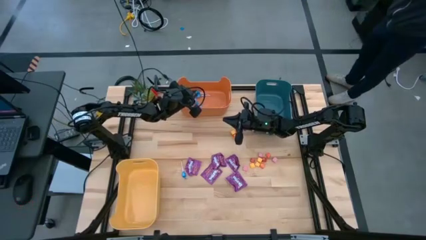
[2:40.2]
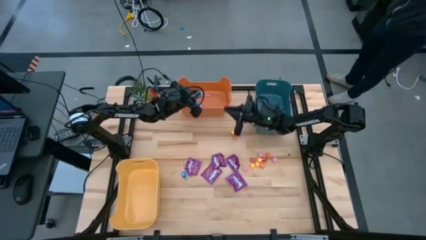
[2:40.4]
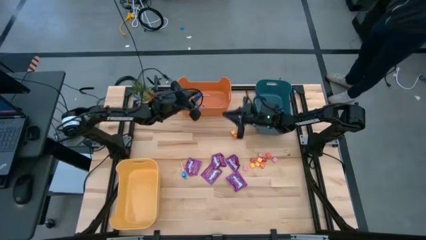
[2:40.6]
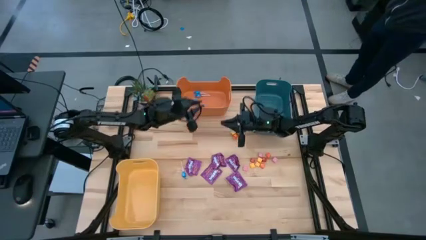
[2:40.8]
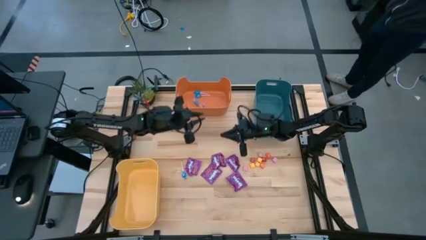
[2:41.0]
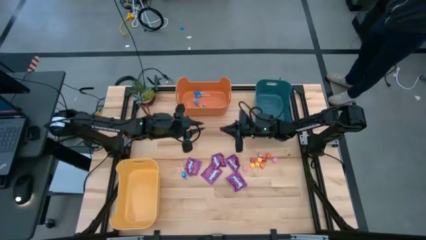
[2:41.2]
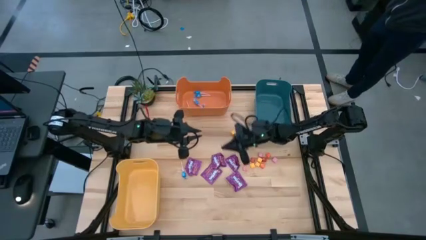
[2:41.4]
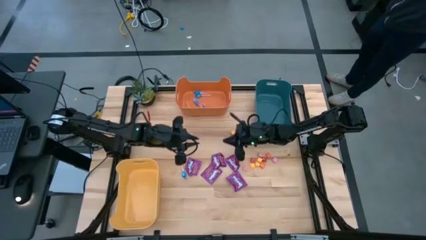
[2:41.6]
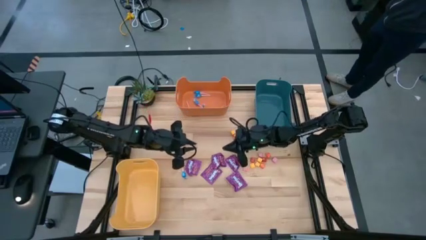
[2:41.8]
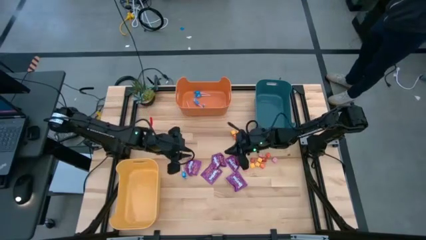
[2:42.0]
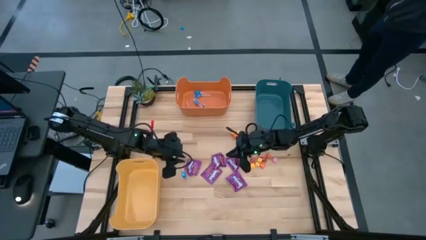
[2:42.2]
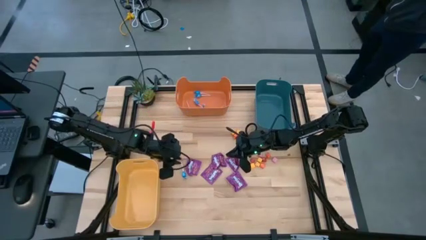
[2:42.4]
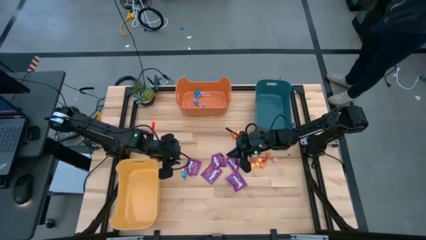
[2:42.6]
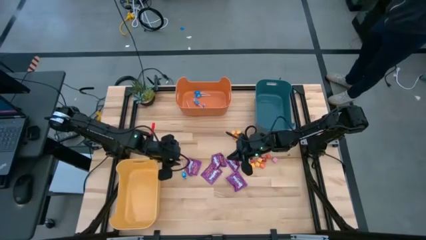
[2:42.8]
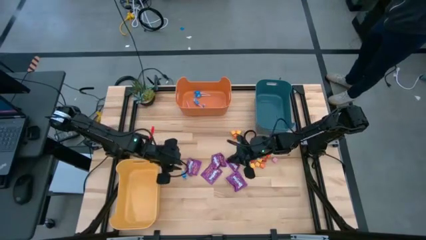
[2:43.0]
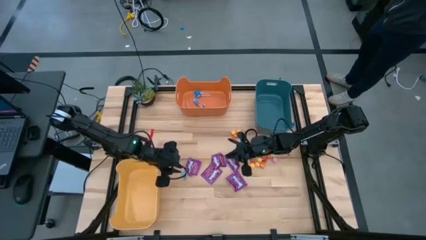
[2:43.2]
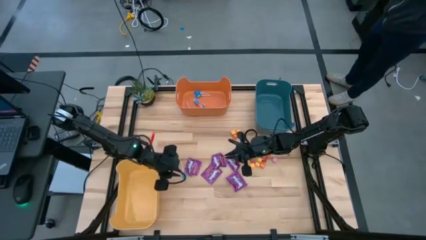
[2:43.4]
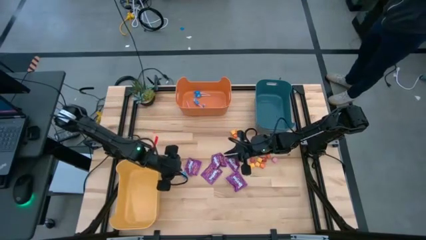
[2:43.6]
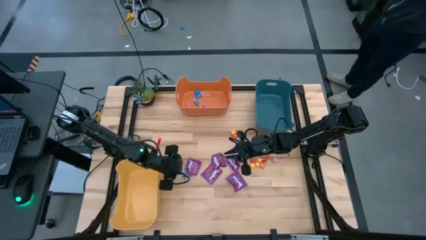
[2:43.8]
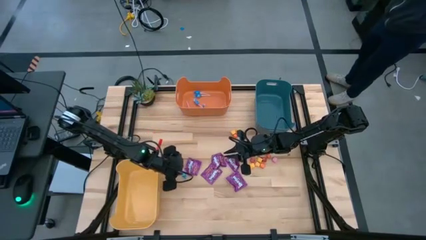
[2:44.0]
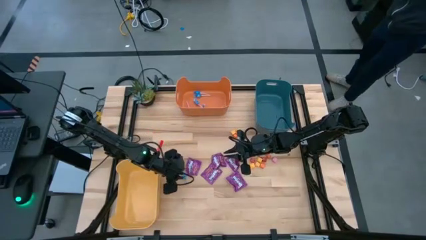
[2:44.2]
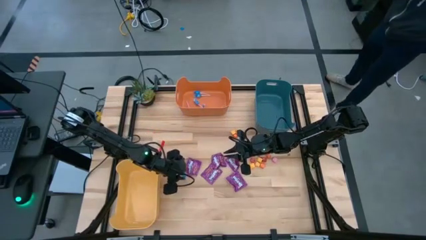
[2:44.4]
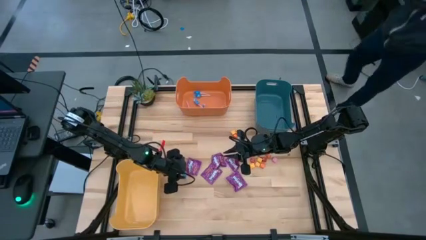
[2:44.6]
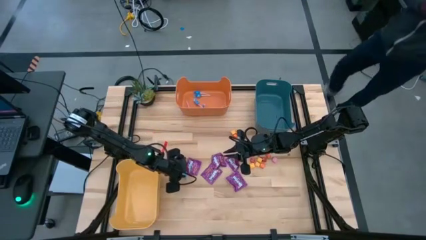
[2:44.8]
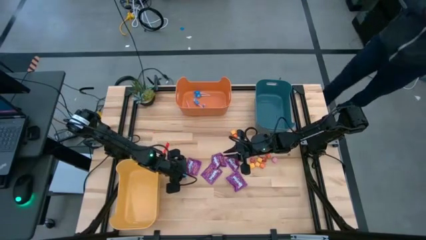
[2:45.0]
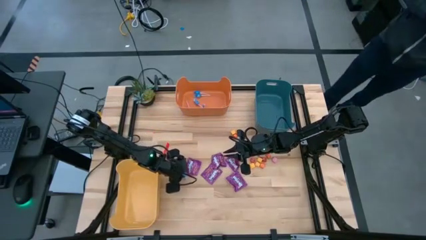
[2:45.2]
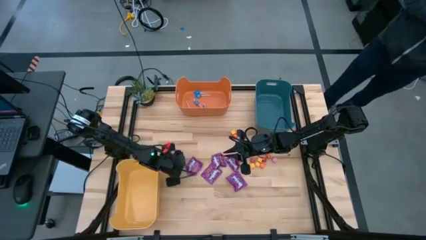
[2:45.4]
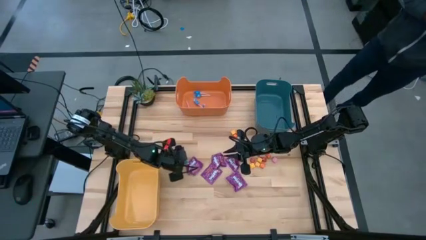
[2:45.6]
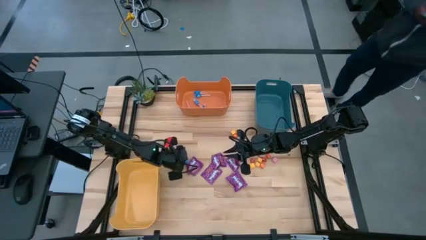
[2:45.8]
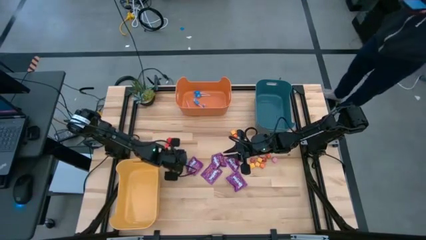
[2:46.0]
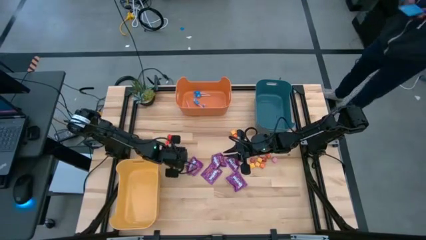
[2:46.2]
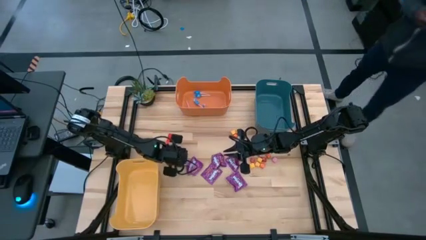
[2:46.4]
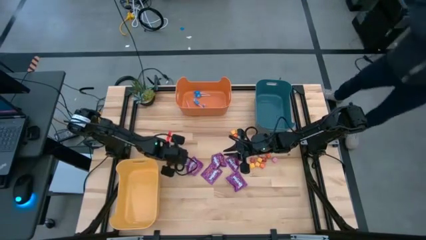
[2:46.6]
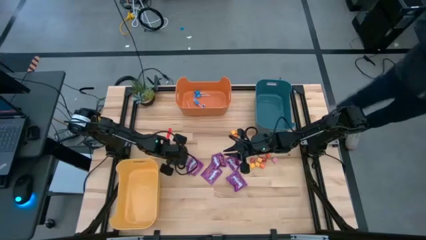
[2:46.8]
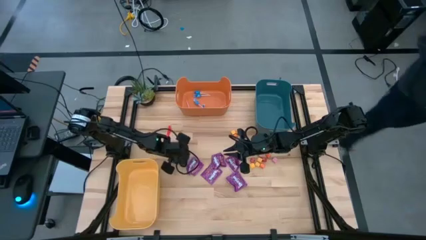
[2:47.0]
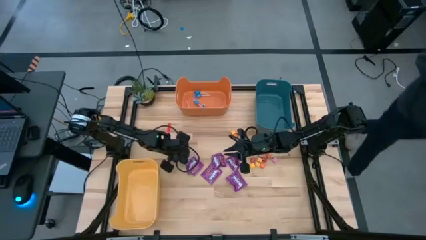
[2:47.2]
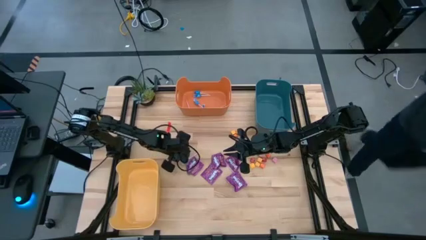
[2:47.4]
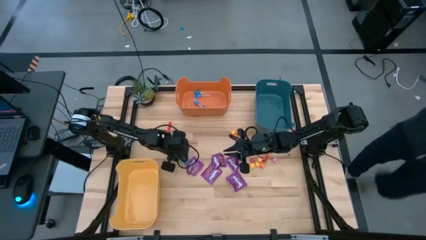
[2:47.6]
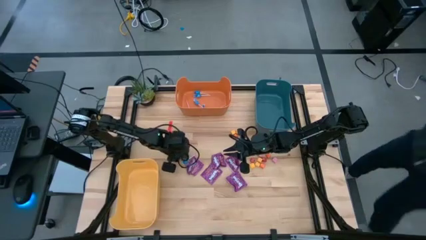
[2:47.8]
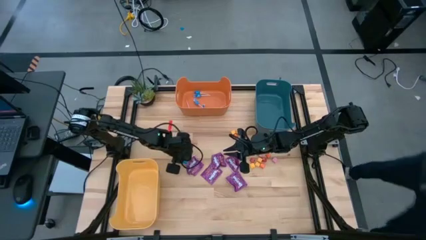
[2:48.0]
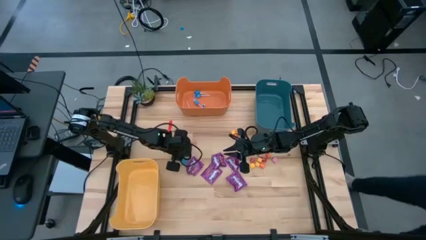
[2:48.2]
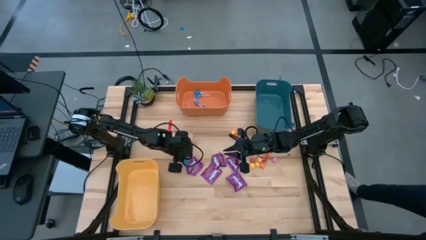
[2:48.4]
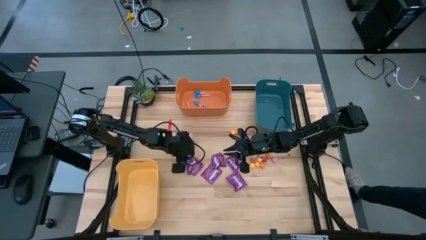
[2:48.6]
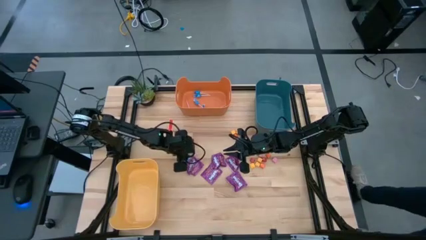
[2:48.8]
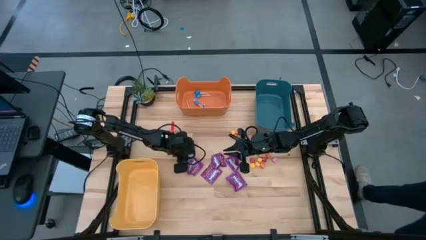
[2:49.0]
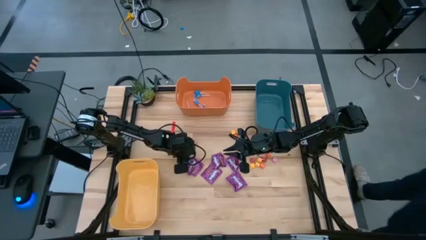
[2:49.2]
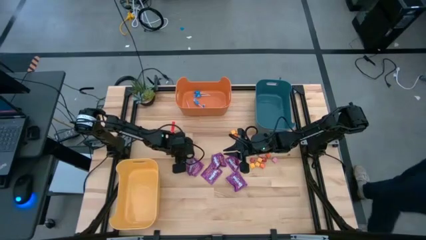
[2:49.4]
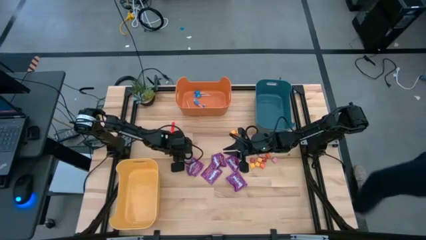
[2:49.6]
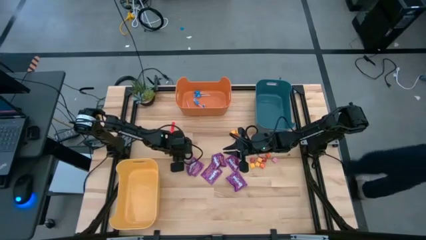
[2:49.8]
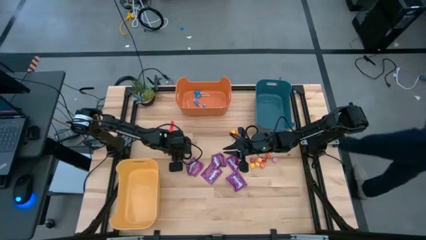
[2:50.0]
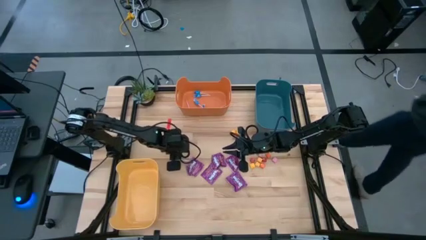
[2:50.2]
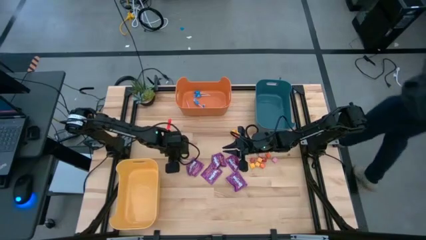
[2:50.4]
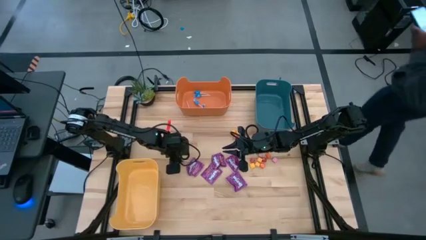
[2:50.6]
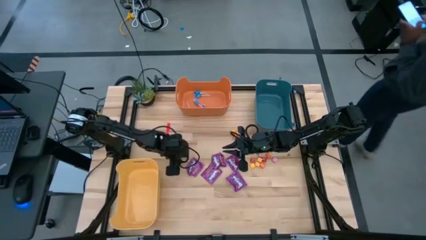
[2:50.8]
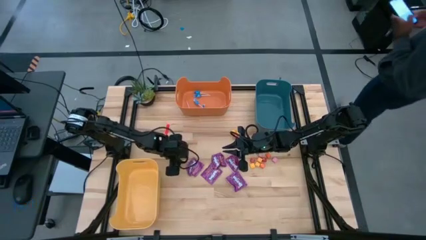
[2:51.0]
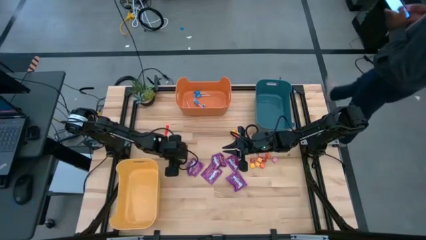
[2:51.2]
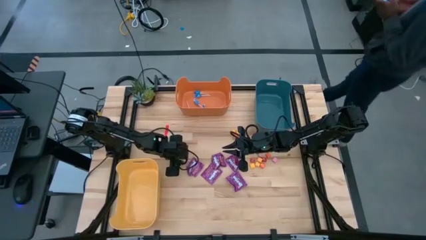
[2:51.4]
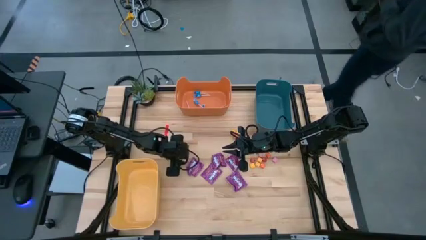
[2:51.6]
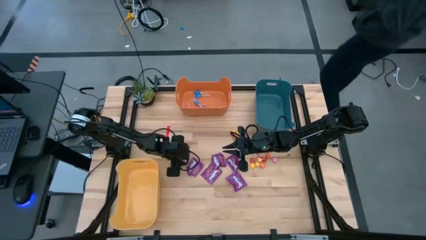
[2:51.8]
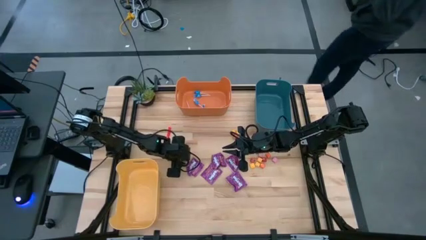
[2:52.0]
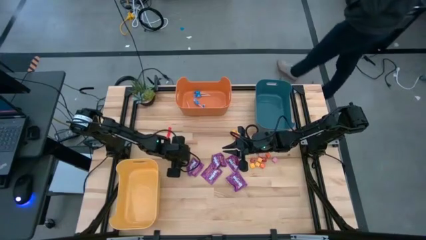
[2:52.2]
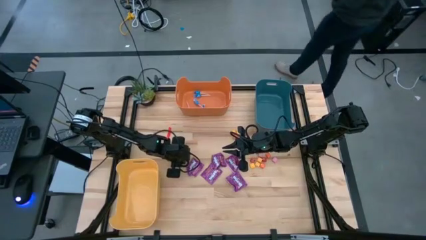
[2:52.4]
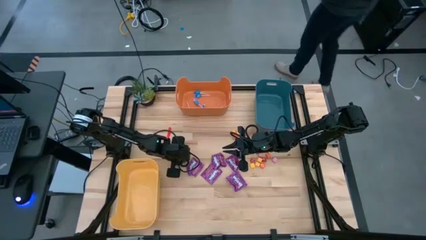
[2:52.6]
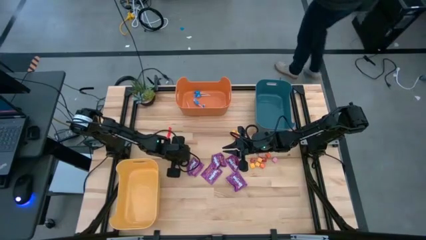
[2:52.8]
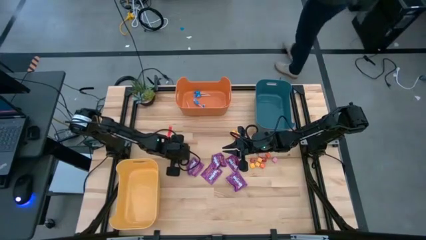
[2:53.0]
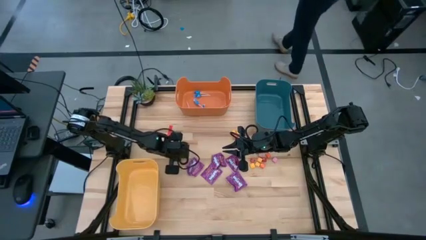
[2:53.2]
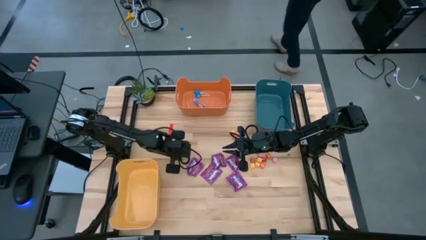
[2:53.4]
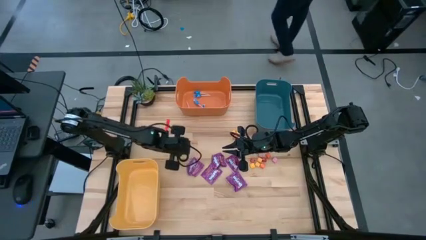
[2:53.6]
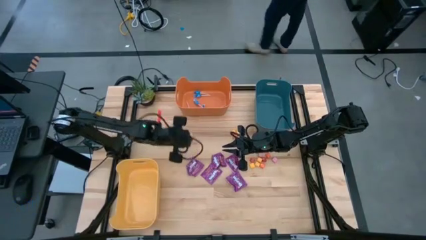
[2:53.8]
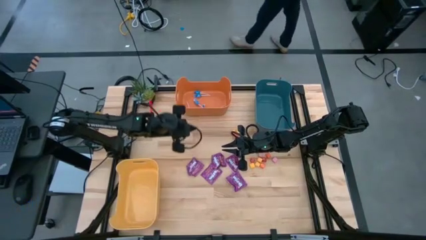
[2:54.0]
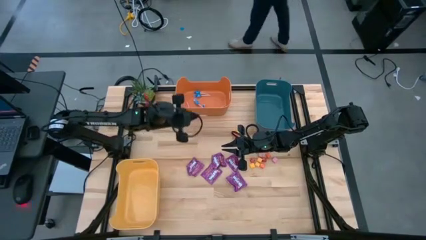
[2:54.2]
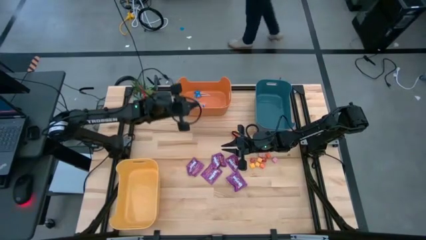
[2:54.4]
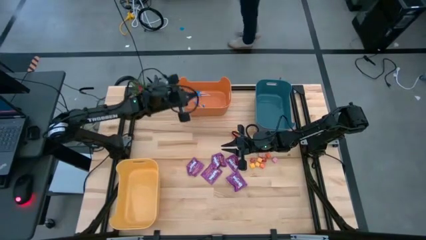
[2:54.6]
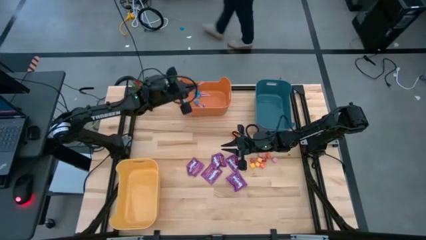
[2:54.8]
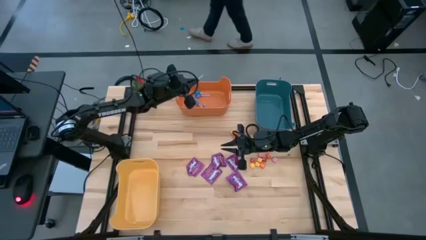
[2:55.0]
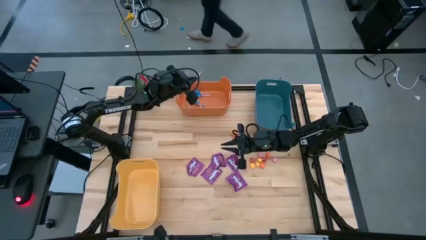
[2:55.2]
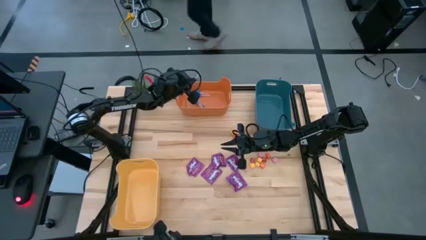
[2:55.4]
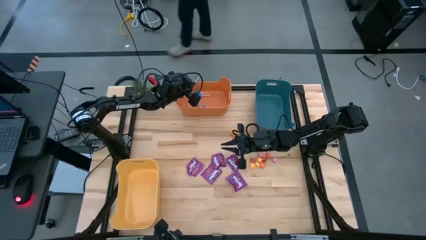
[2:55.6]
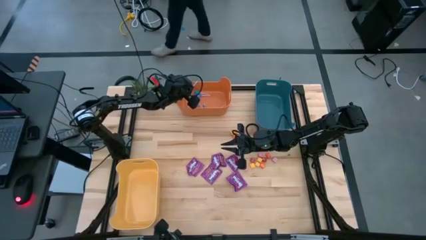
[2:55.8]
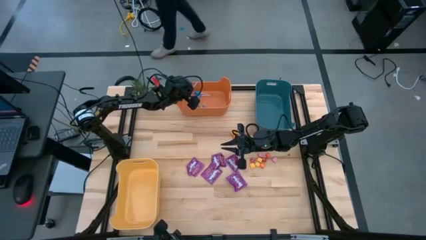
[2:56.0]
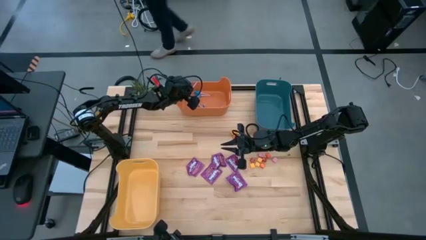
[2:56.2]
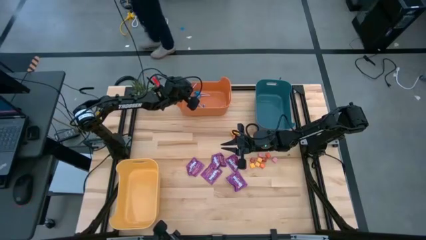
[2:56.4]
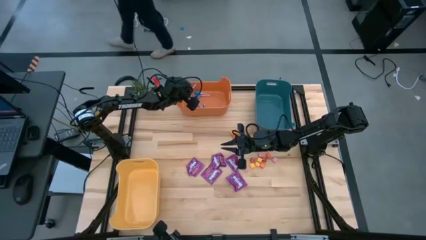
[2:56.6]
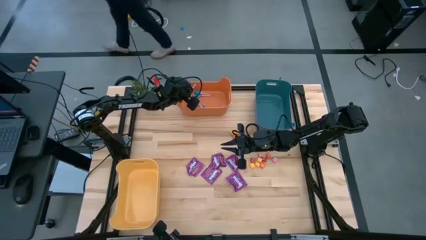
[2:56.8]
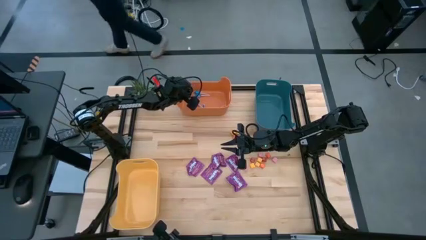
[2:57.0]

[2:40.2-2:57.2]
Task: Sort candy
Put the blue candy into the orange bin
